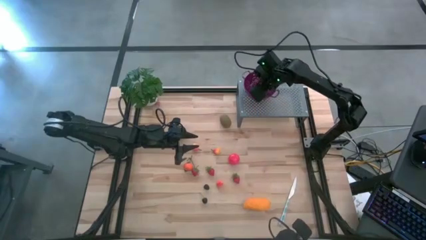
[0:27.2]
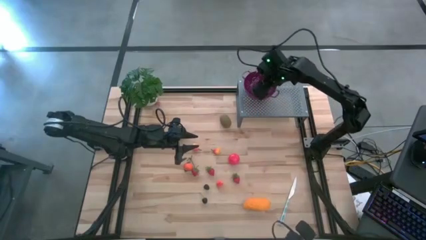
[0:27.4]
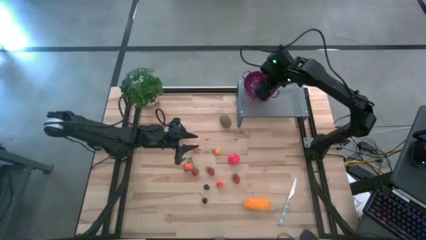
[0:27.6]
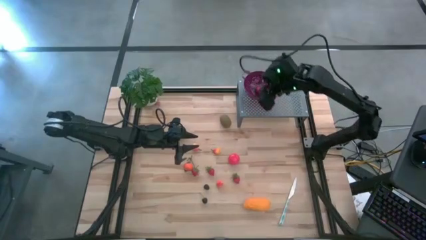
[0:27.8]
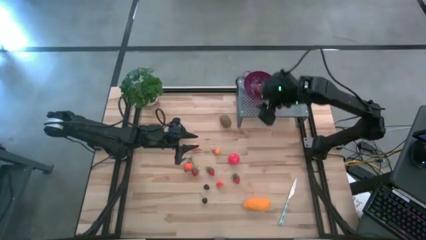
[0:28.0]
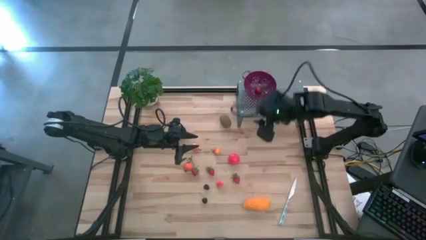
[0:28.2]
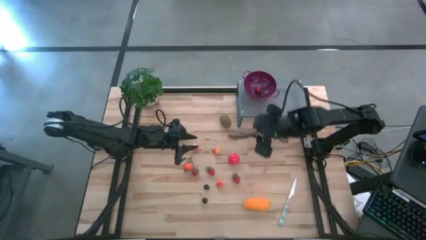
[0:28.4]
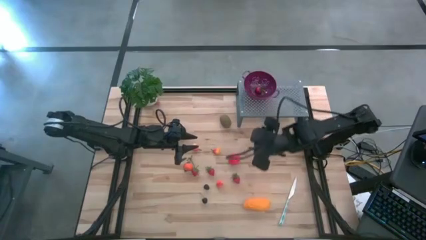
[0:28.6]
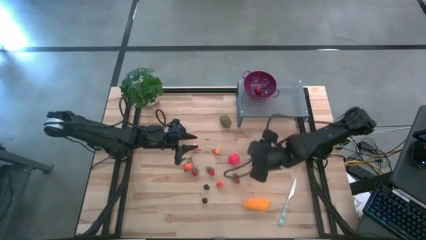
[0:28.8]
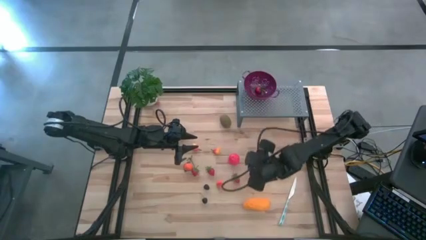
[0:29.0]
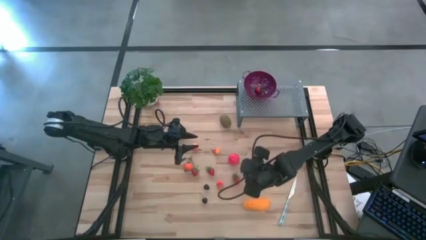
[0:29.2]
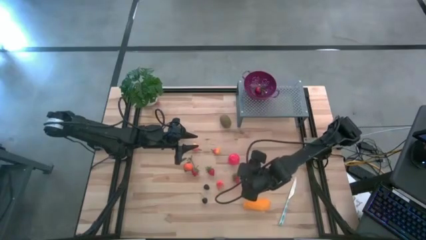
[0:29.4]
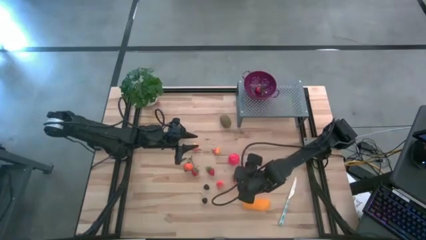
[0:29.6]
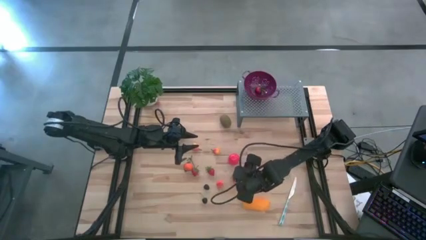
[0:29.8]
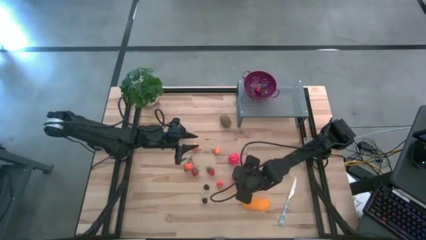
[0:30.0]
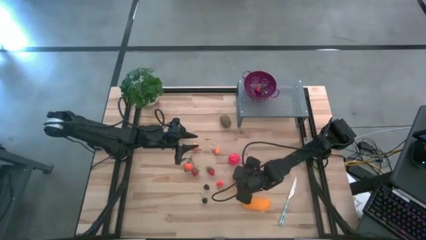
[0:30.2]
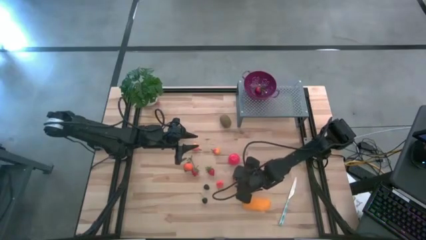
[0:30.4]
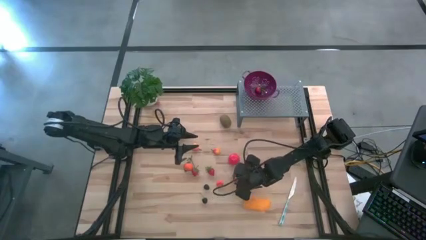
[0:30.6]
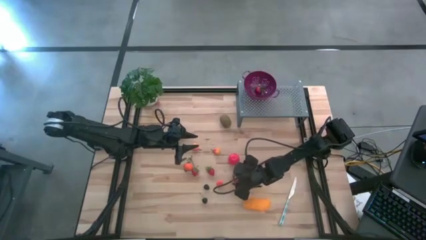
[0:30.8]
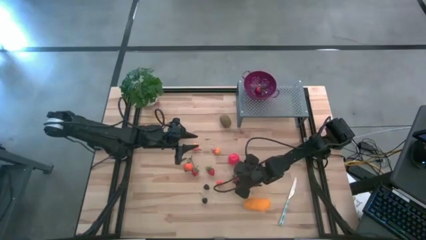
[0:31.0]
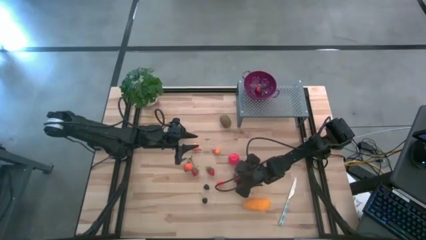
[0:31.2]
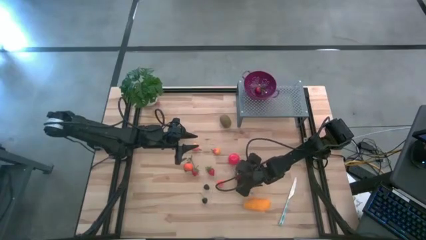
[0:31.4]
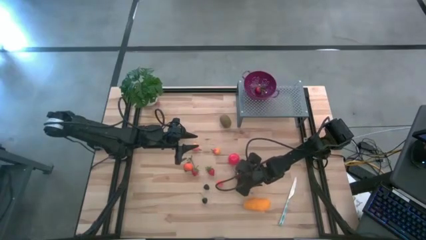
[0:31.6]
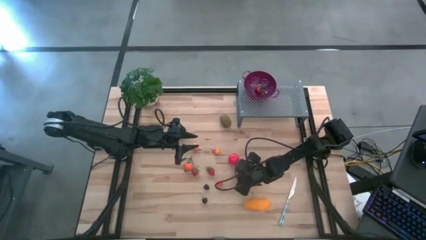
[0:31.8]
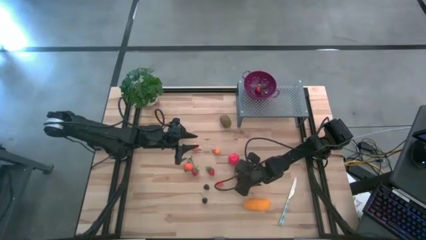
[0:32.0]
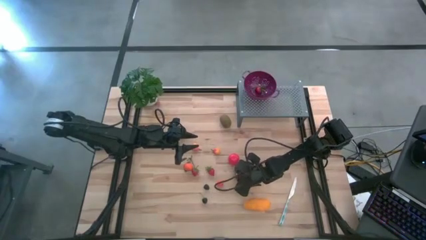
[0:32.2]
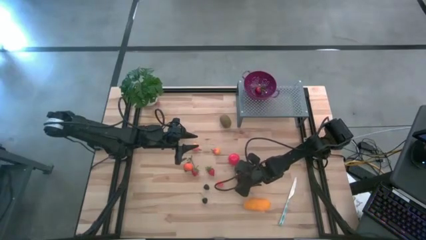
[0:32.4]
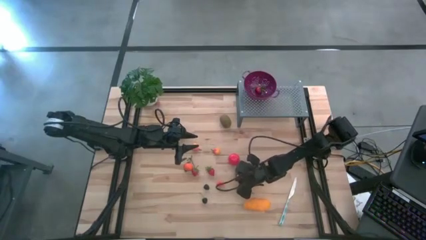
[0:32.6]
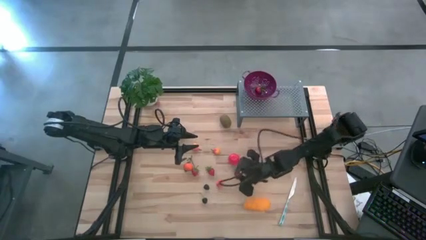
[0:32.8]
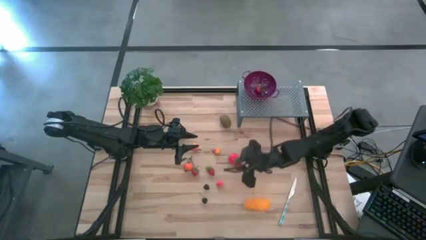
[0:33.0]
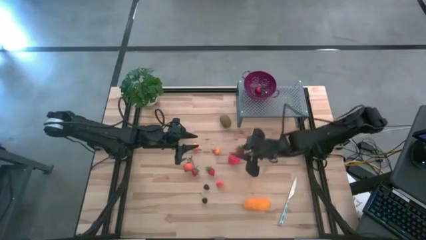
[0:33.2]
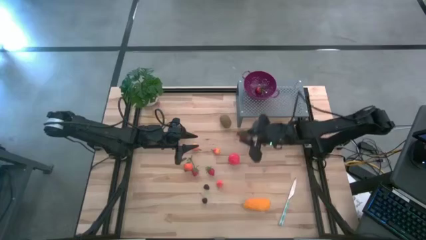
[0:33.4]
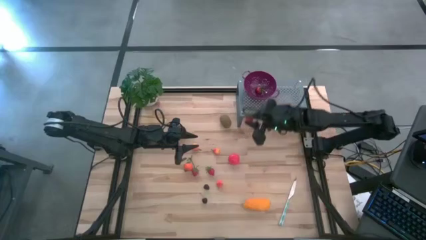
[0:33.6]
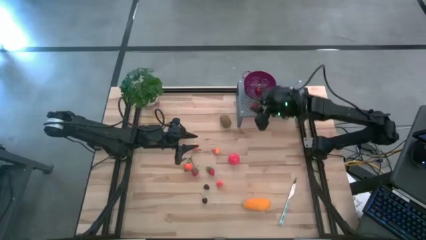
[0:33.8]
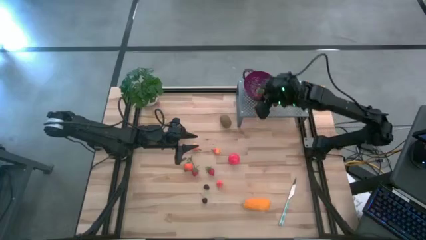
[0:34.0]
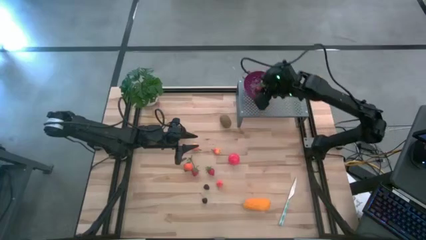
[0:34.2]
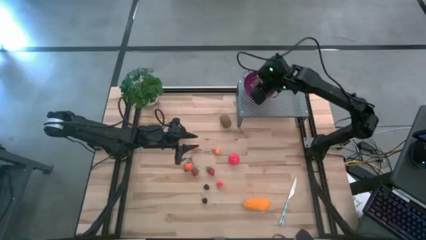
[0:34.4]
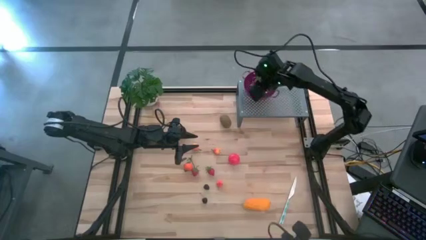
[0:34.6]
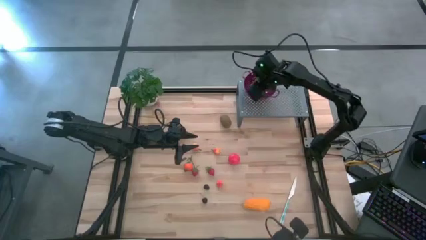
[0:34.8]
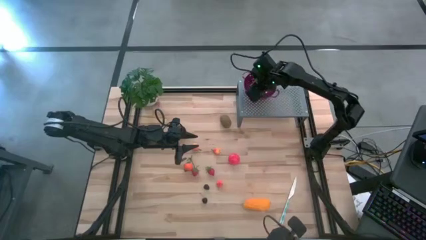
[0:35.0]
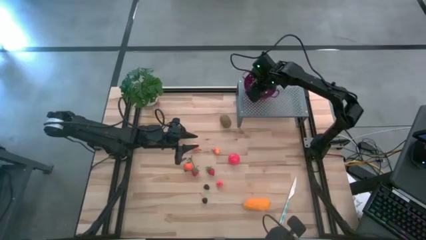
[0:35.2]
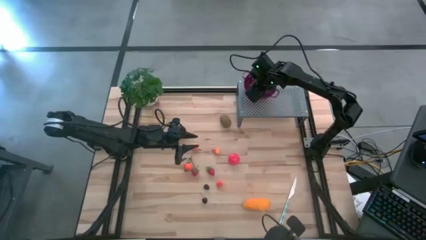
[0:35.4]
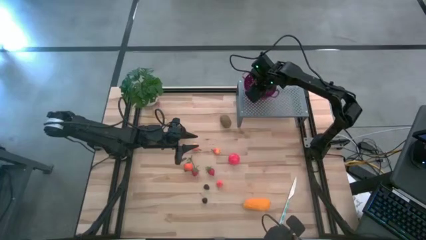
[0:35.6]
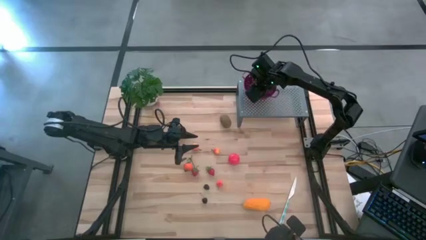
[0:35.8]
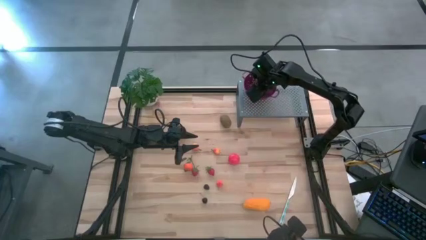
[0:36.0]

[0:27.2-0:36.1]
Task: Pick & Place Fruit
Put the strawberry into the violet strainer bowl on the shelf

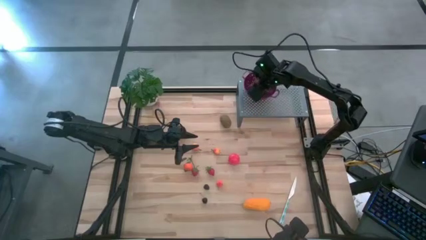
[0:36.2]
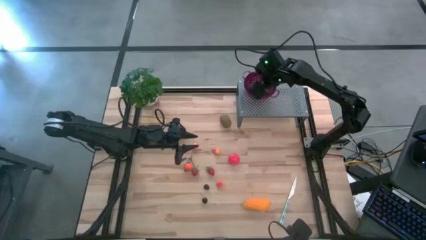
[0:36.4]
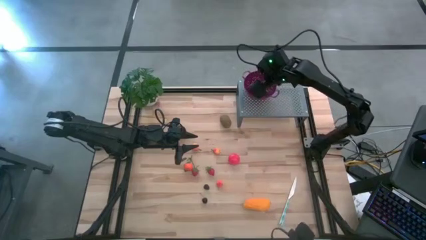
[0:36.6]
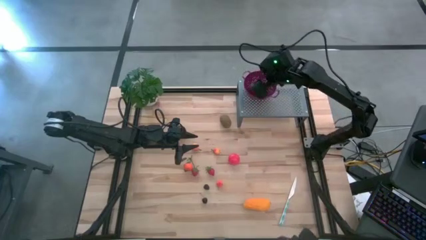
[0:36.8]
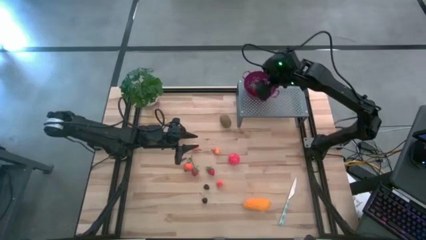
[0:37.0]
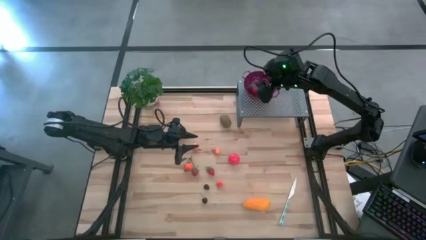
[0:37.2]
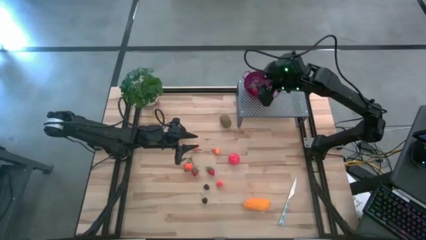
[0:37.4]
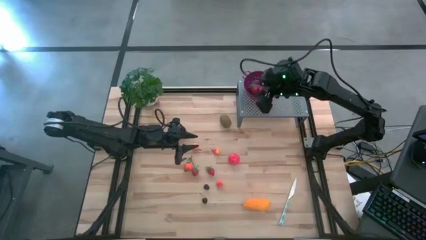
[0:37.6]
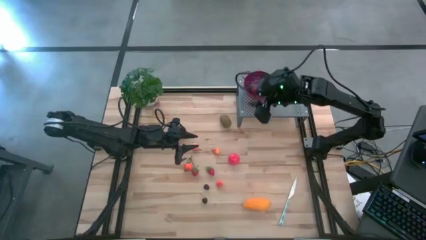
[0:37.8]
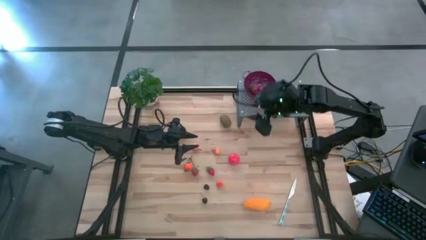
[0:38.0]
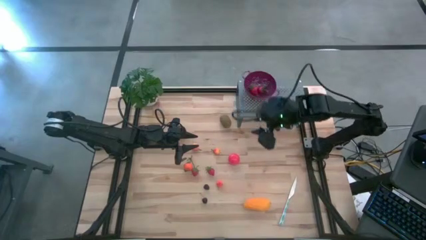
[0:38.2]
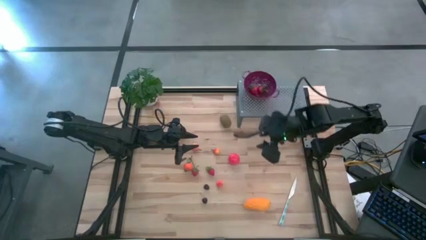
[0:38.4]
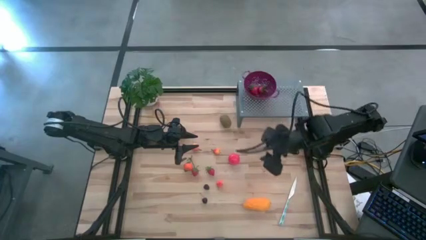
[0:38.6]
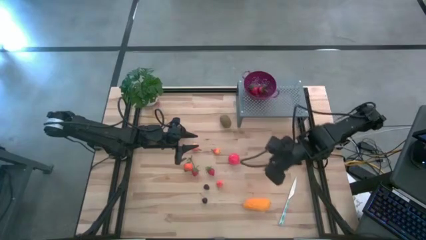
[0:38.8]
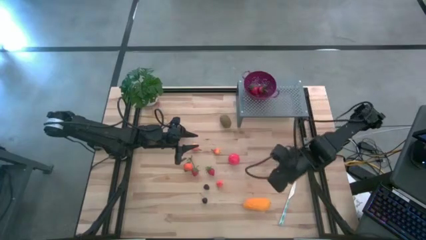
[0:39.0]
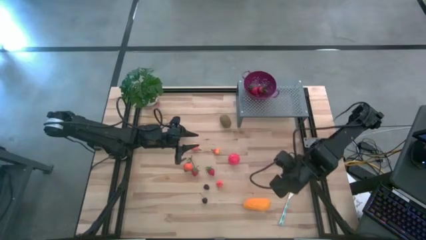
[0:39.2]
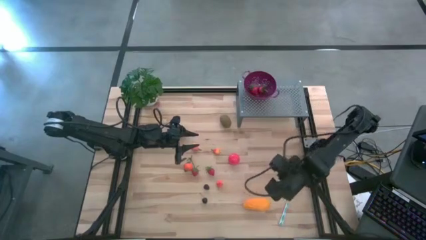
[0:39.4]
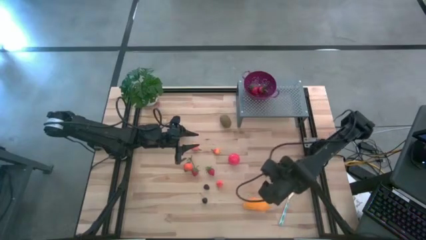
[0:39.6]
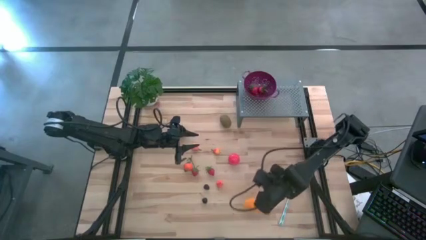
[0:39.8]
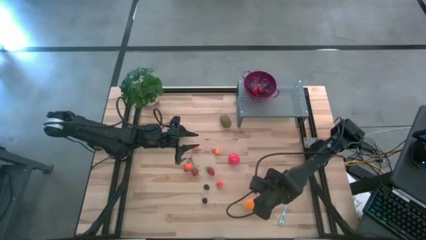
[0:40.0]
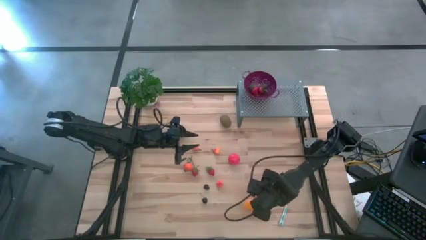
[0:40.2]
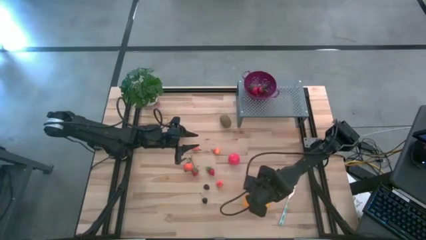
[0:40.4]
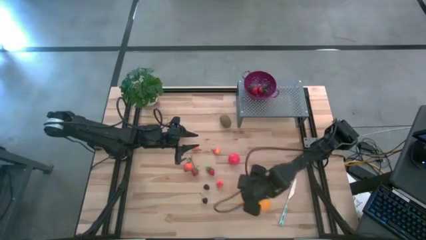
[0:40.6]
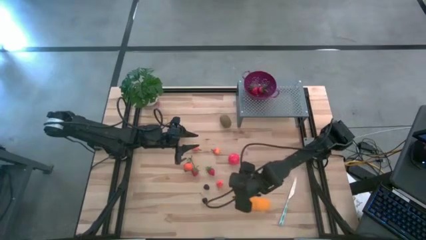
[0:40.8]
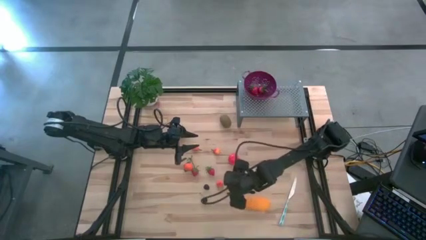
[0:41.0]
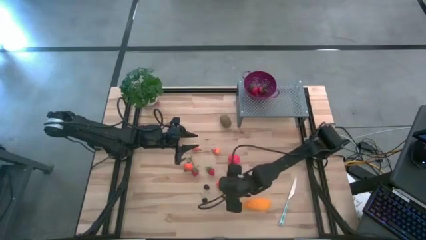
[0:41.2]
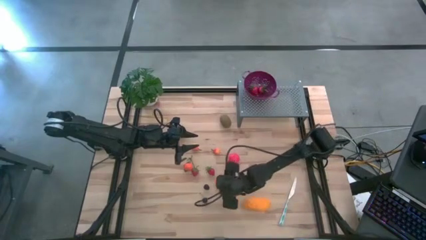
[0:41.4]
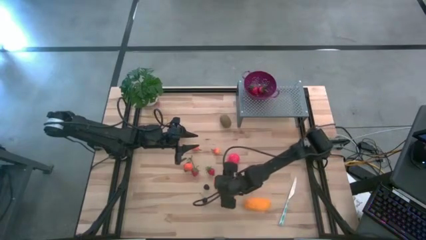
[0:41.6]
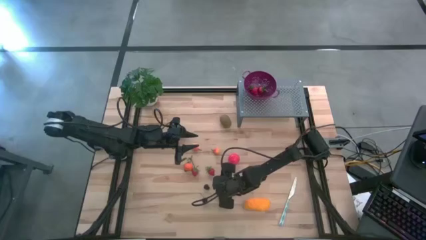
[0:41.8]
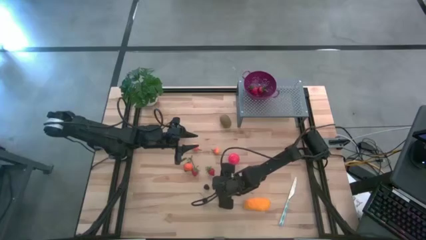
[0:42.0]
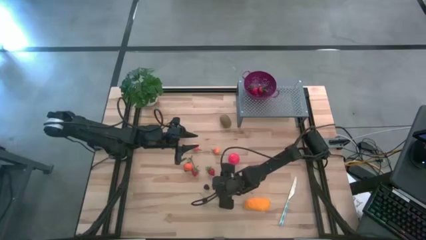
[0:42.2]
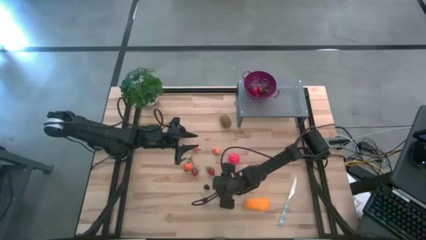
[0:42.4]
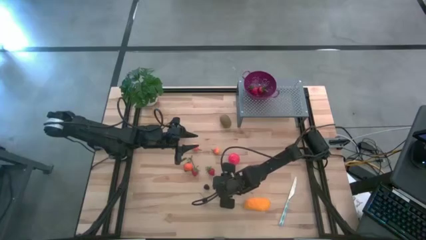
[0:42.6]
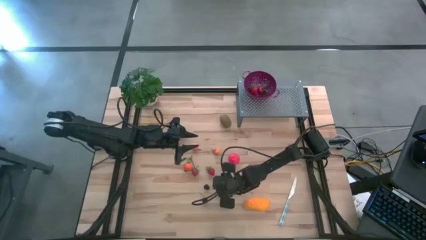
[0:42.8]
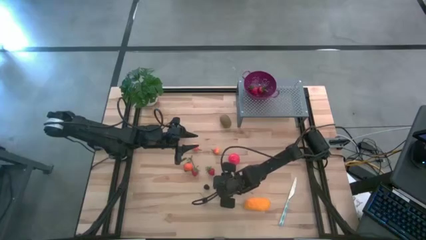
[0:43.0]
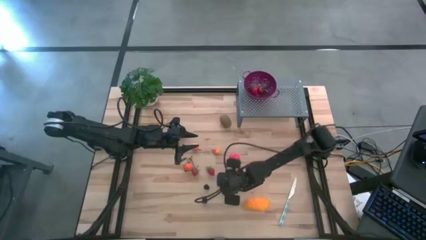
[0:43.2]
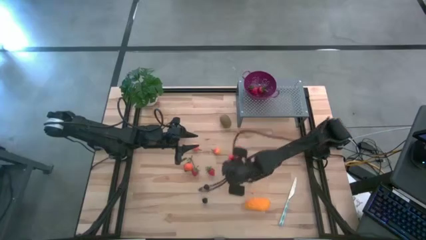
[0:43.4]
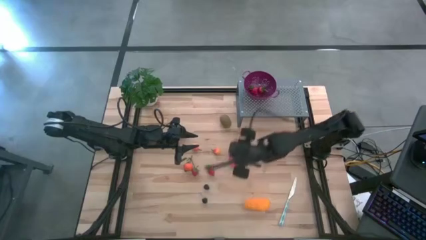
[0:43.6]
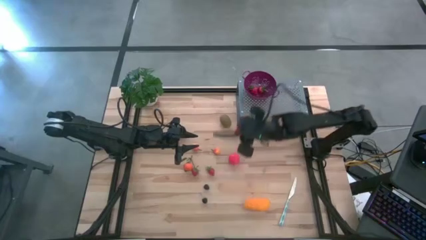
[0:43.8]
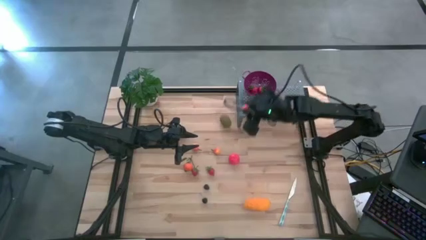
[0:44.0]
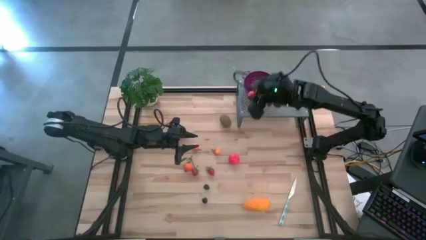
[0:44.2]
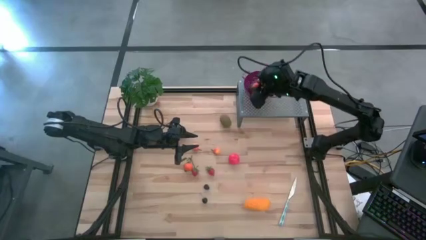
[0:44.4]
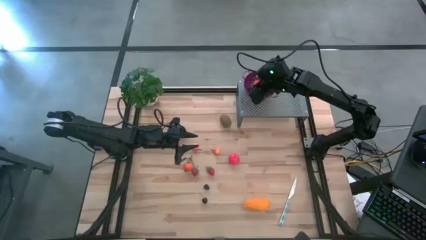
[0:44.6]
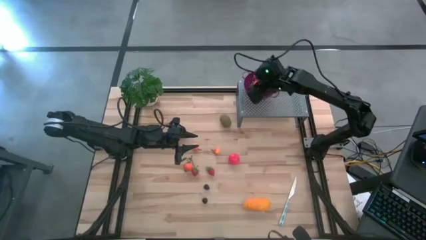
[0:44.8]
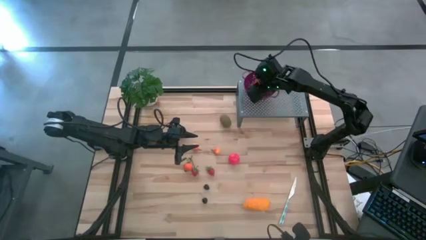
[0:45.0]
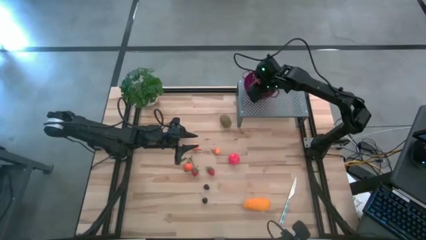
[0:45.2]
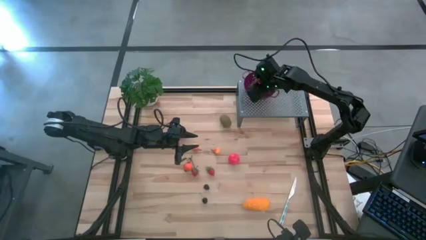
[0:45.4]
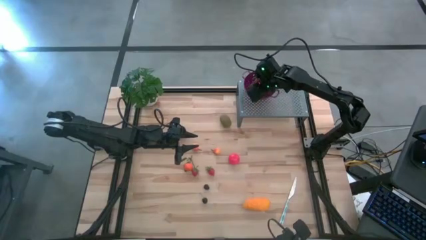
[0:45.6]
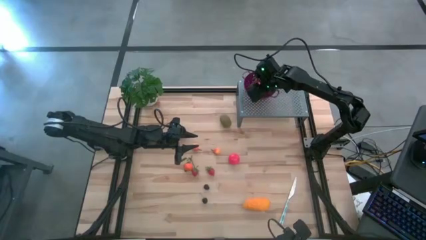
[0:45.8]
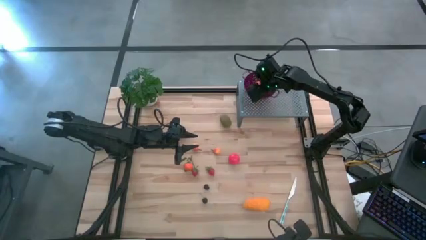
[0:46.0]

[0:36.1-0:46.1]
Put the peach into the violet strainer bowl on the shelf
